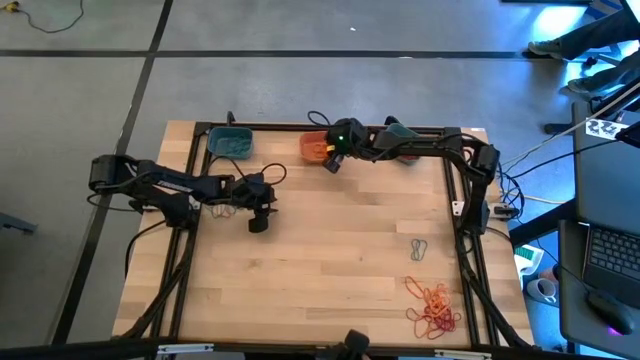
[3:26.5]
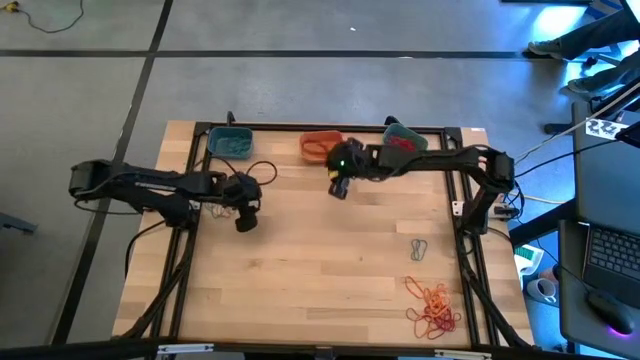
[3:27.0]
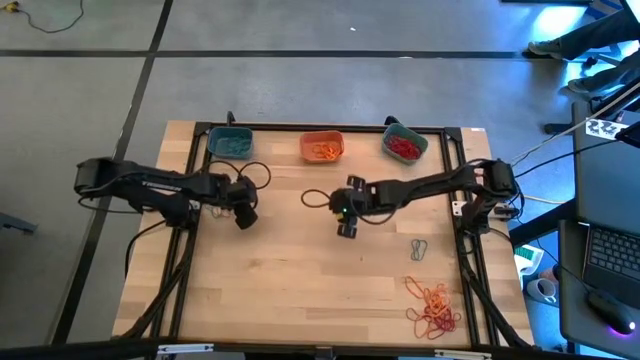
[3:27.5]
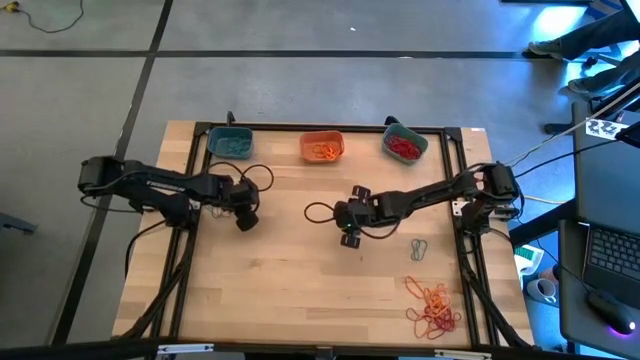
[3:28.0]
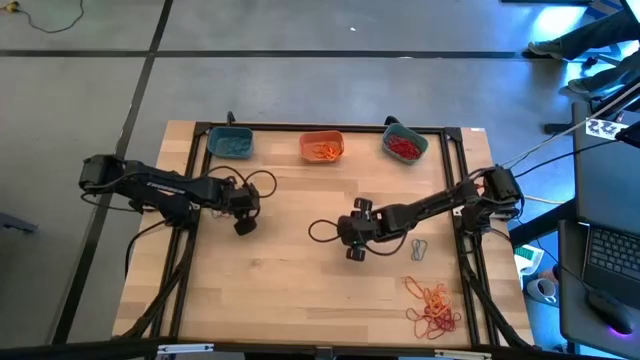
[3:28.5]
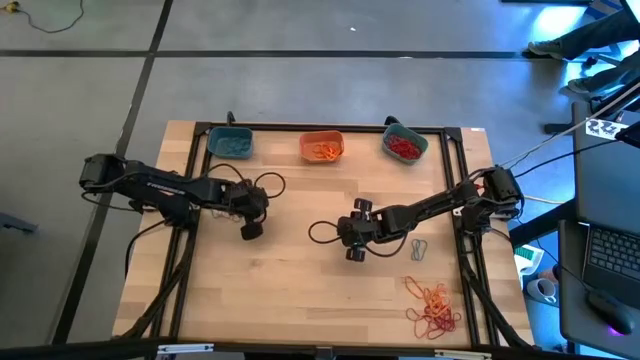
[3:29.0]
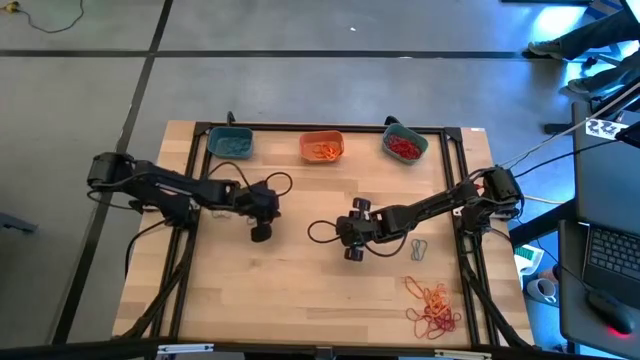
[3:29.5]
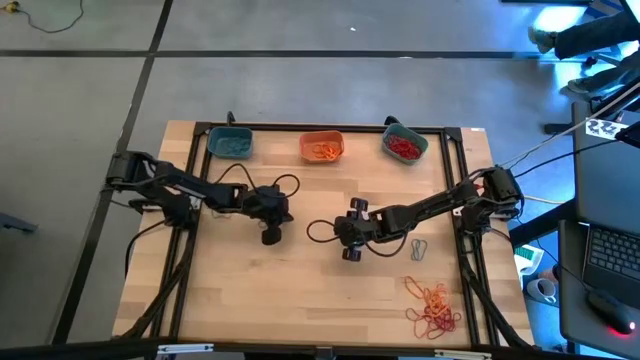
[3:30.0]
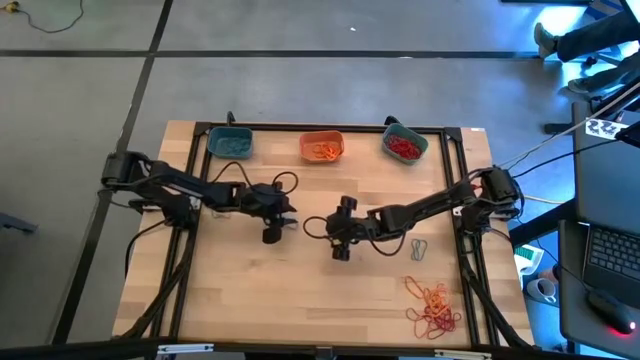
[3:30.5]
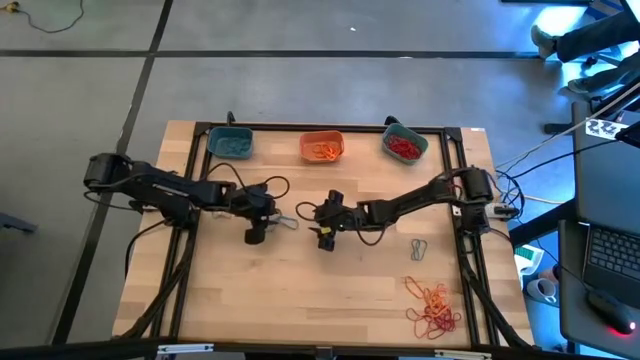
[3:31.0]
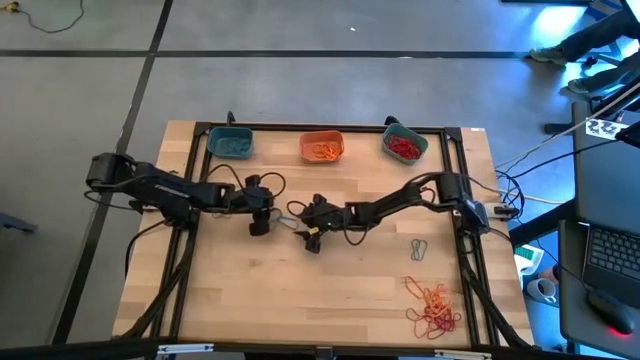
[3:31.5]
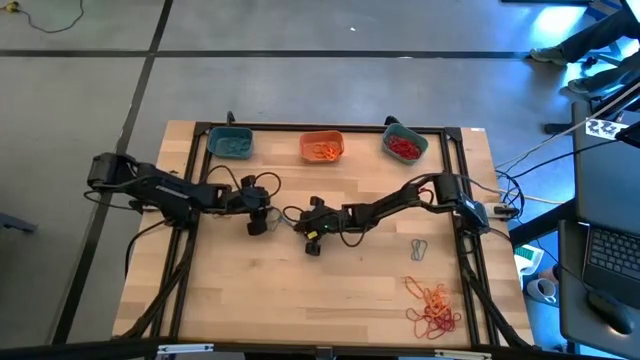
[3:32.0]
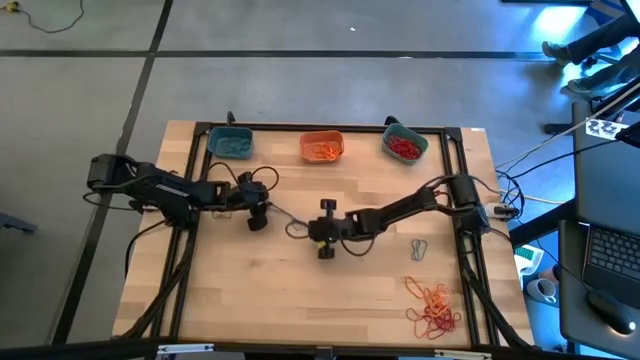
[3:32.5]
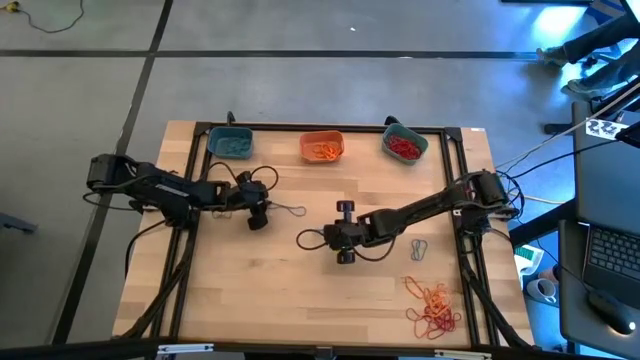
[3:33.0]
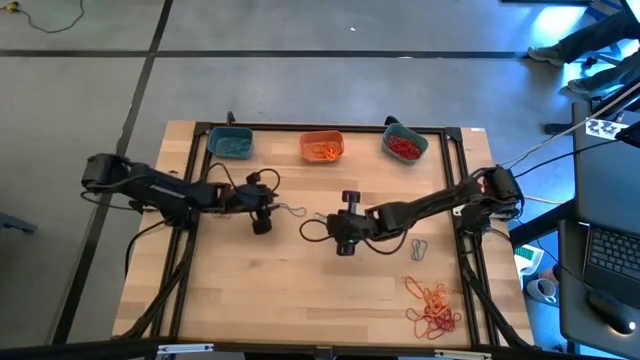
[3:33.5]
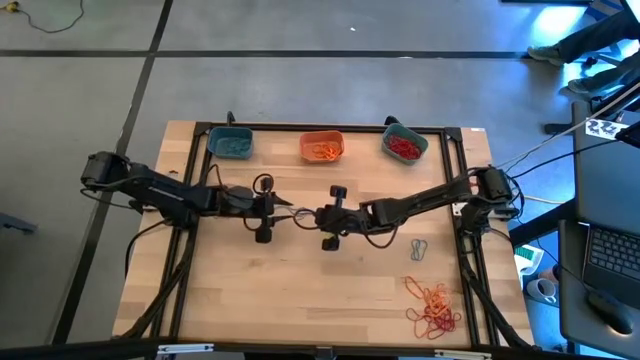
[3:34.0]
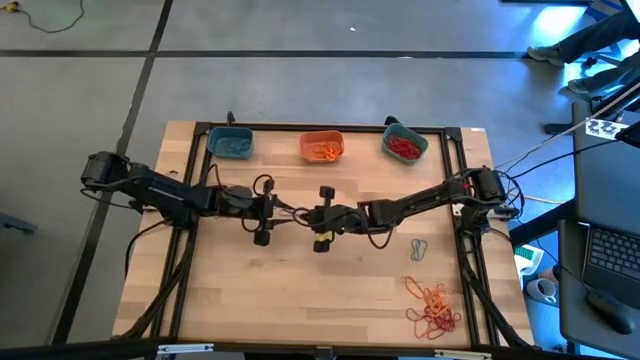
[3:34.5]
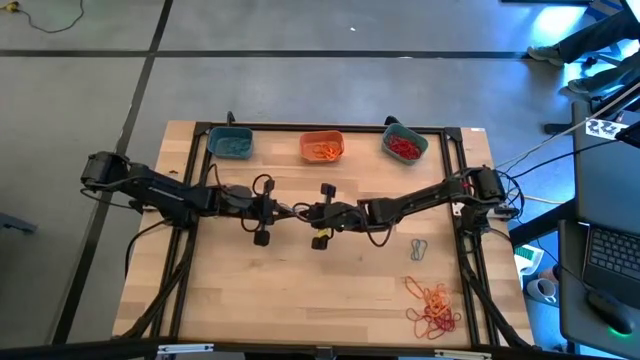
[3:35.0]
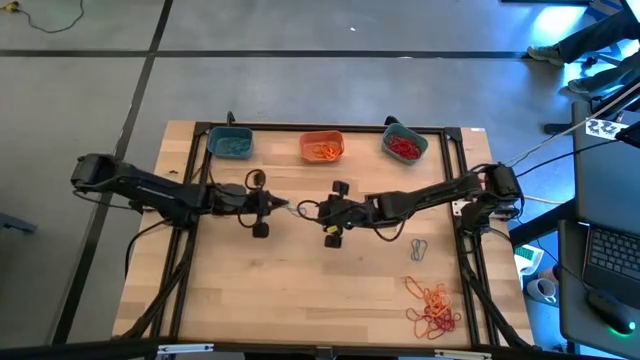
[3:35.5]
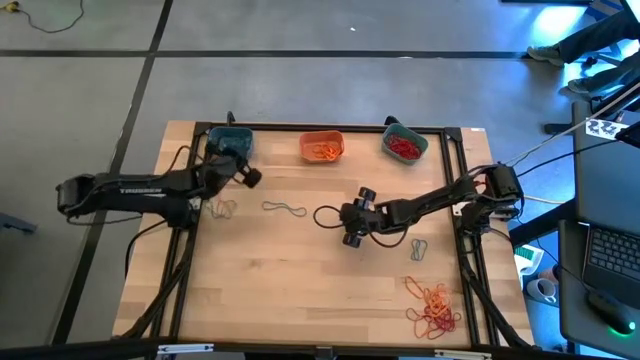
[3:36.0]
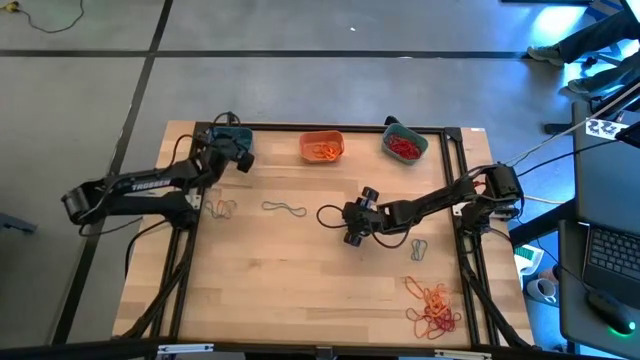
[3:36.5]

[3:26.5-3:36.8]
Task: Sort rubber bands into baskets
Put the blue rubber band into the blue bin

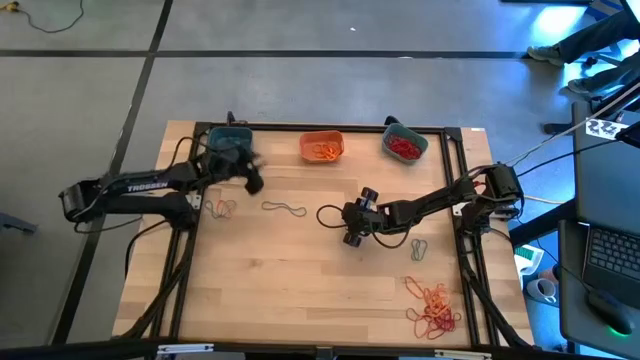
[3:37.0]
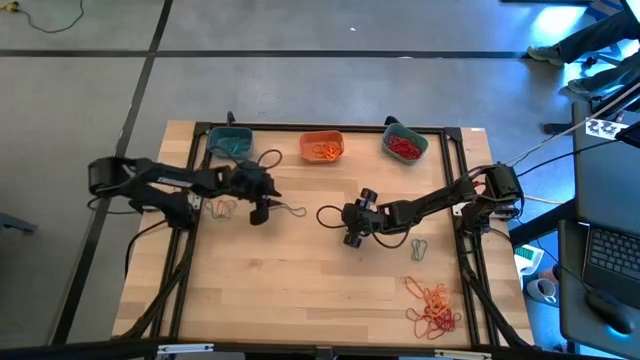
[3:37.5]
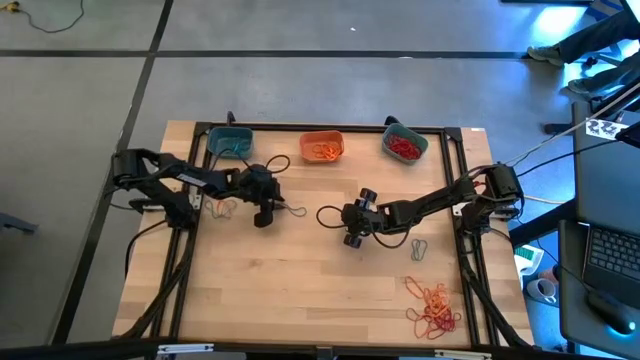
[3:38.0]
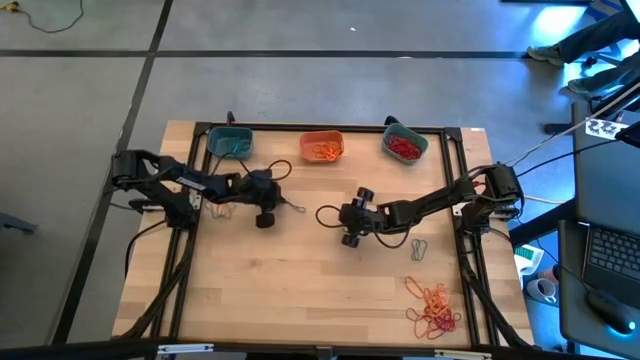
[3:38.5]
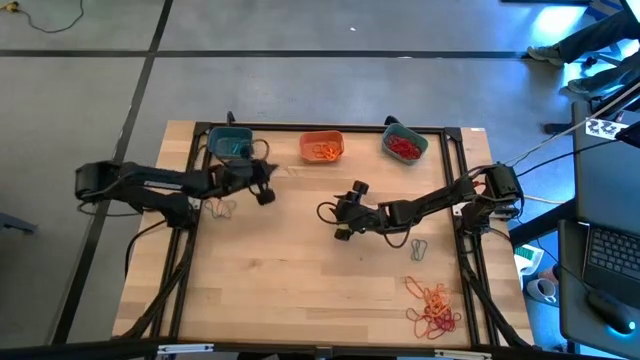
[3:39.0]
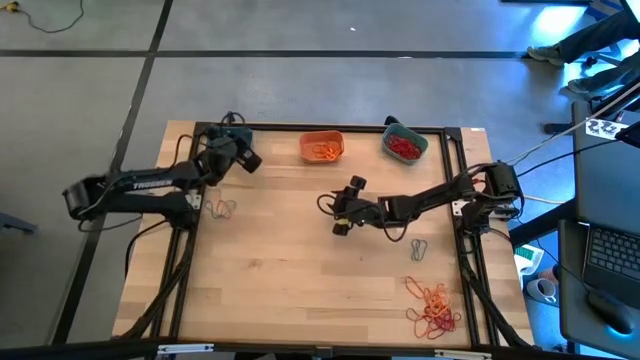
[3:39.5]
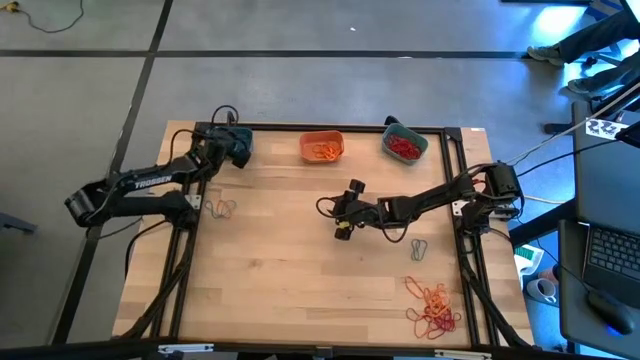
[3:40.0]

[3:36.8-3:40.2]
Put the blue rubber band into the blue bin

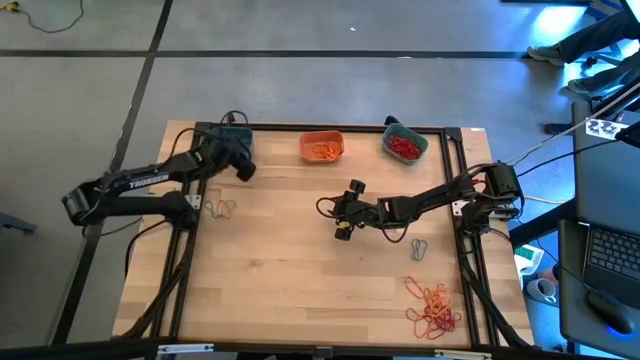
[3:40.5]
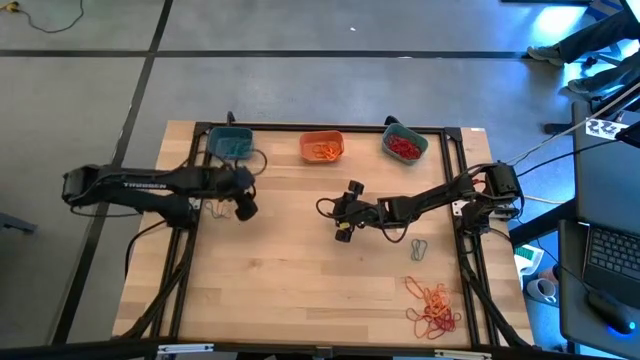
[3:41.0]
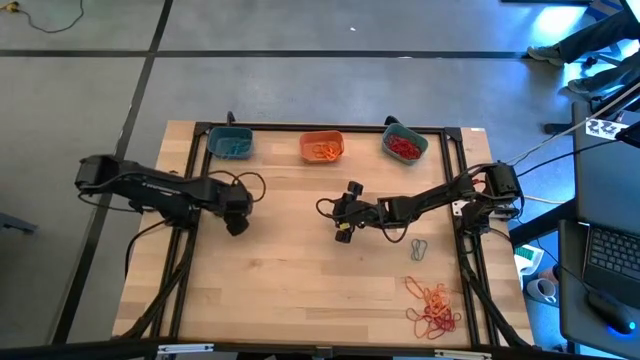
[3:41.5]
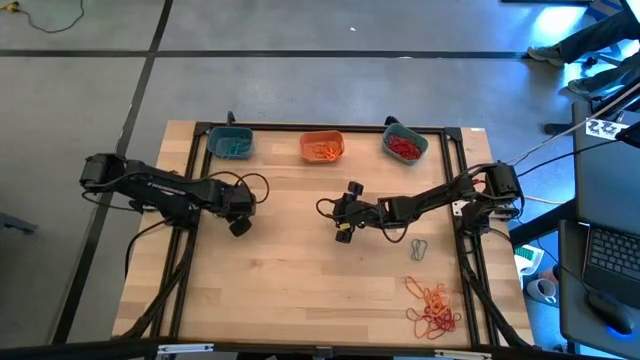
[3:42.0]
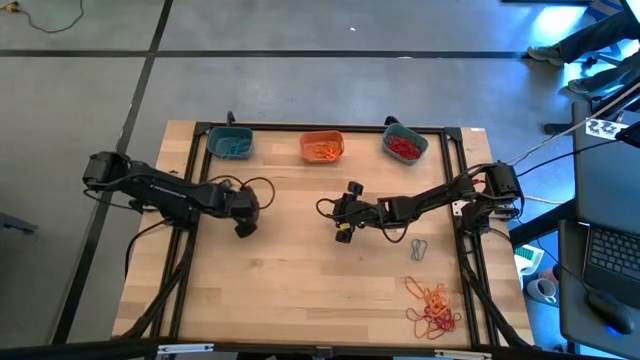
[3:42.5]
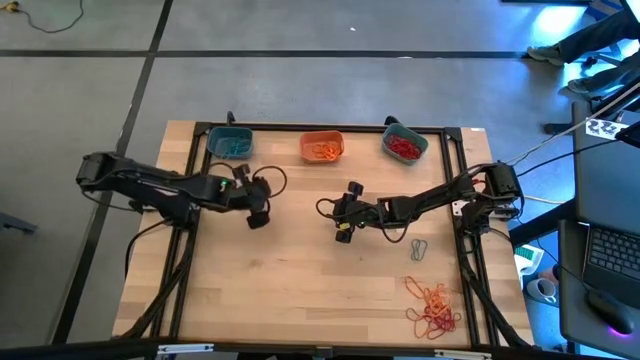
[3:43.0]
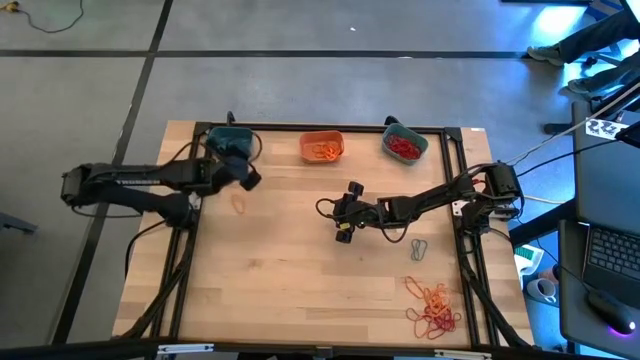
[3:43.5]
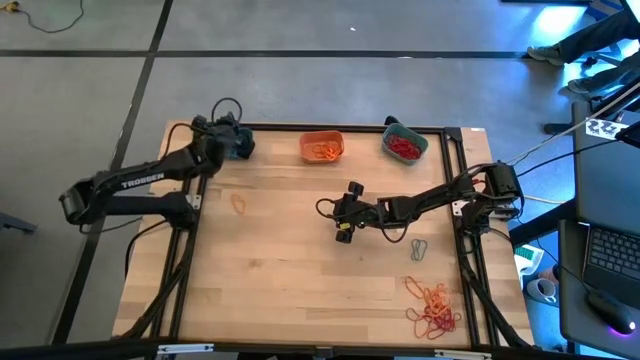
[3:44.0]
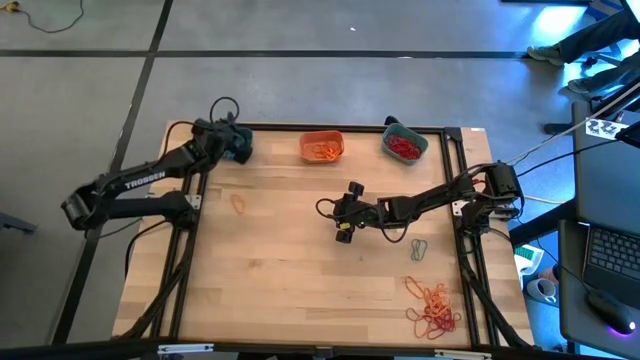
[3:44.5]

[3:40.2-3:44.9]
Put the blue rubber band into the blue bin

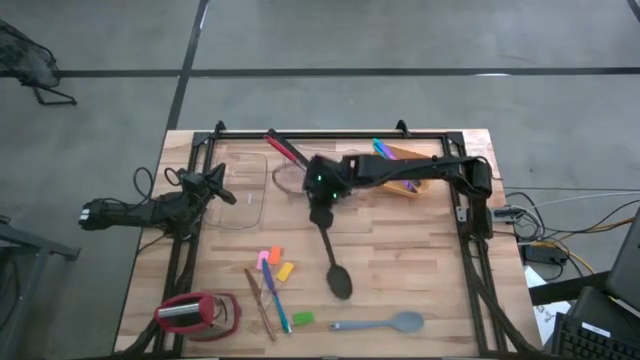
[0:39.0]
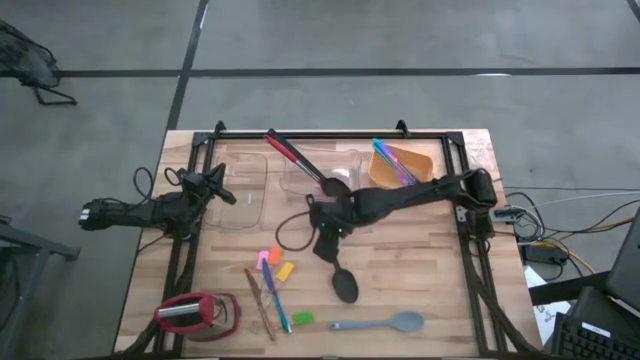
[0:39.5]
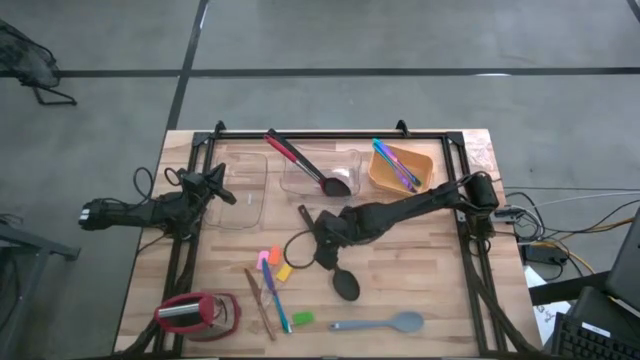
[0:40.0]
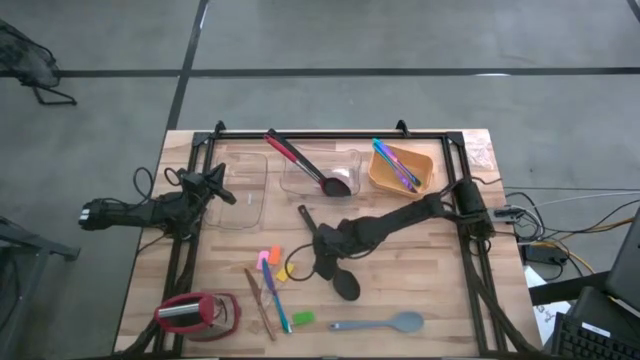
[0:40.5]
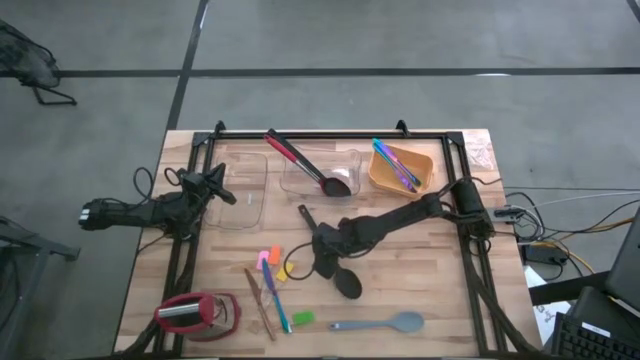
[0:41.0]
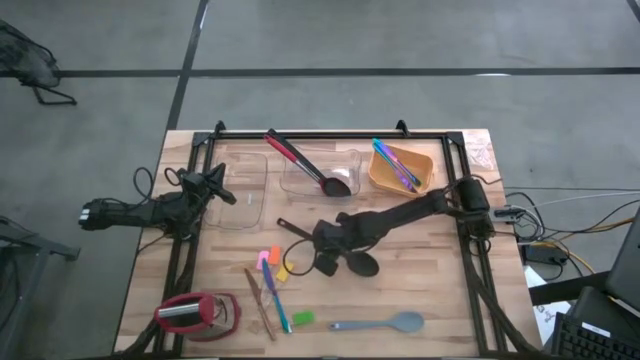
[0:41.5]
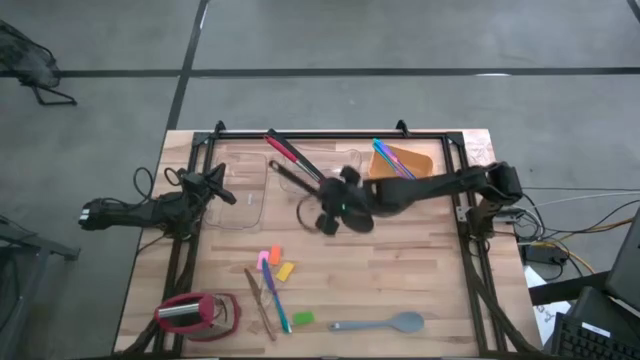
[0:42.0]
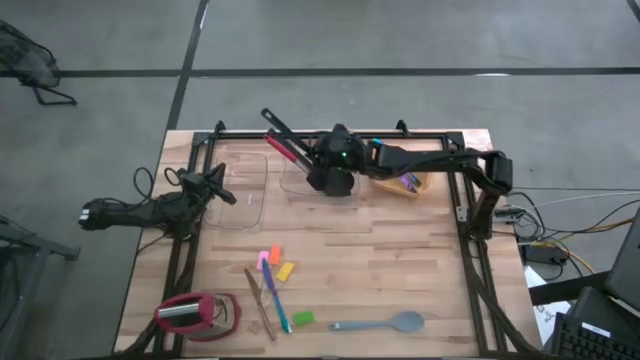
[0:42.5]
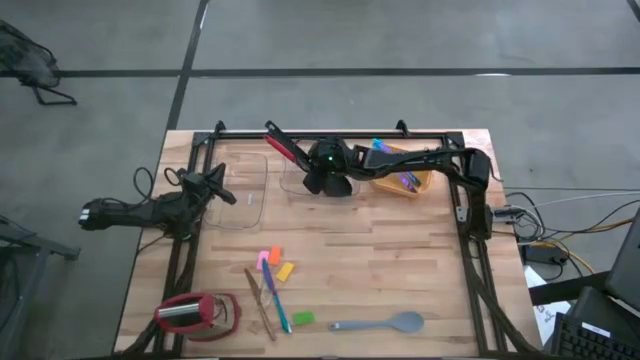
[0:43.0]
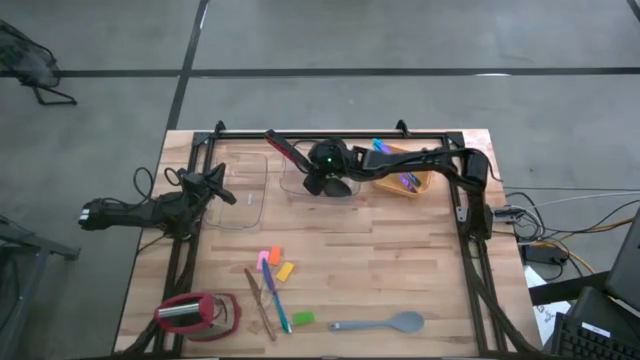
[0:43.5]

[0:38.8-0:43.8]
Task: Sort silverware by color (type)
Put the black serving spoon into the right transparent bin
